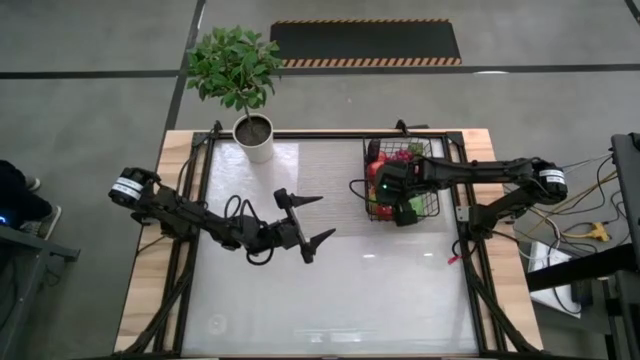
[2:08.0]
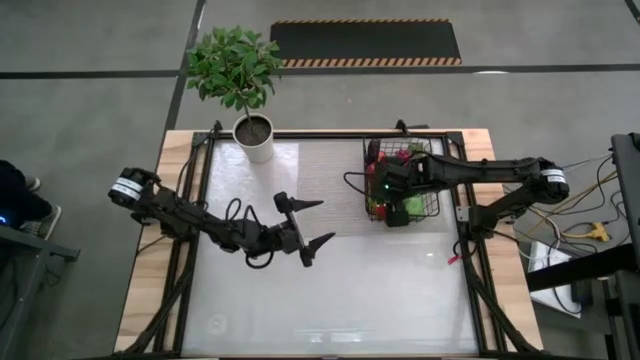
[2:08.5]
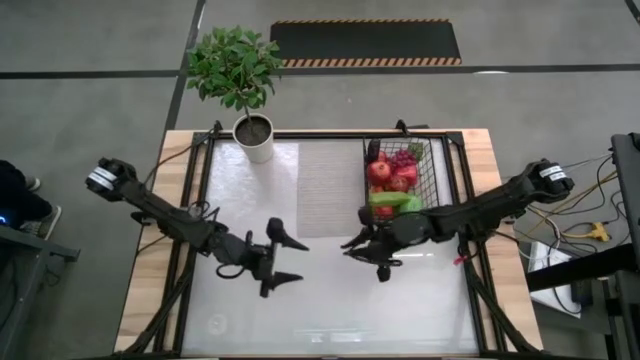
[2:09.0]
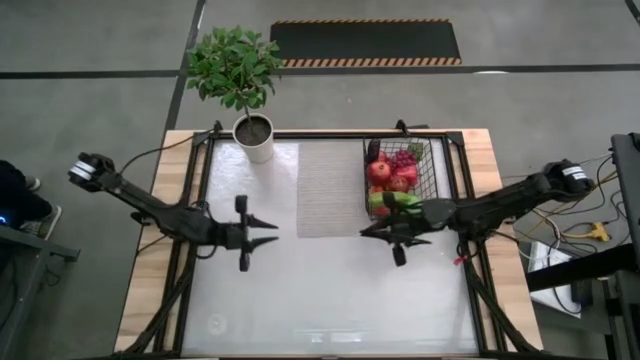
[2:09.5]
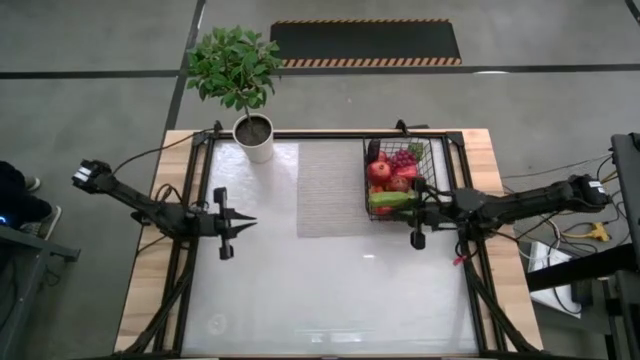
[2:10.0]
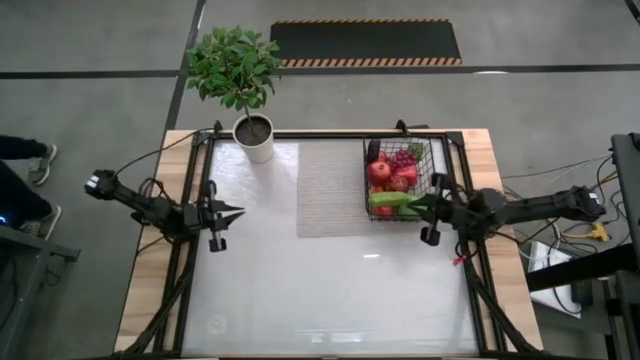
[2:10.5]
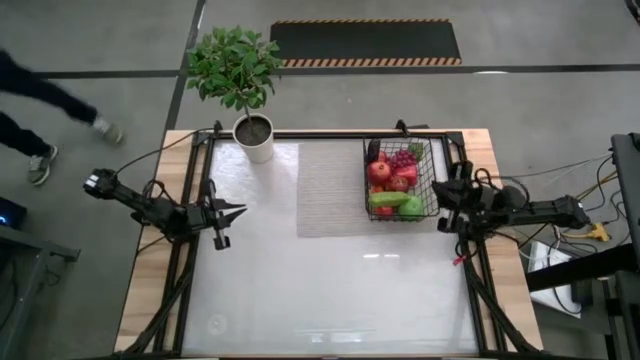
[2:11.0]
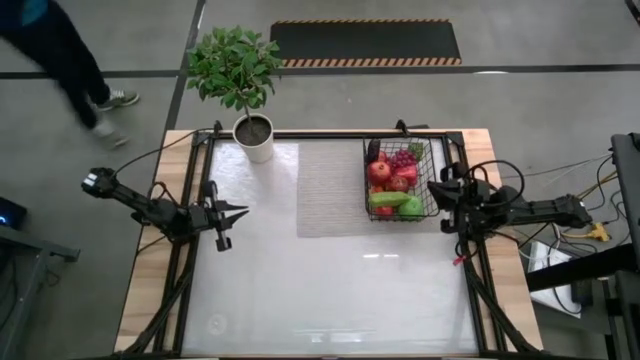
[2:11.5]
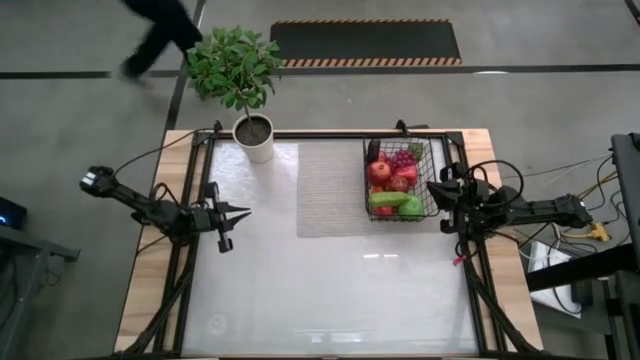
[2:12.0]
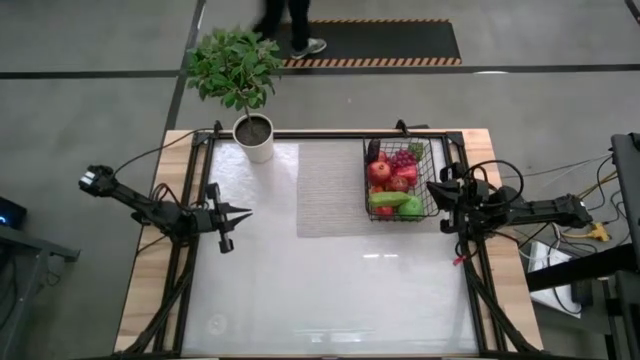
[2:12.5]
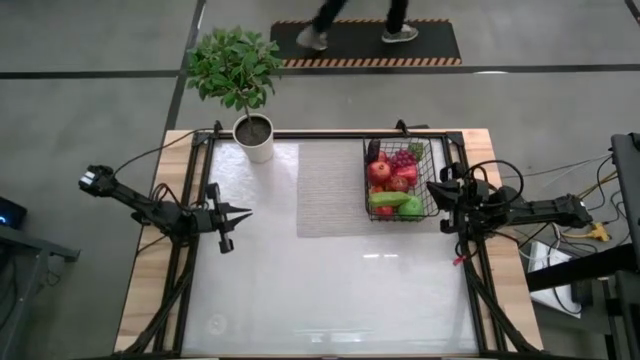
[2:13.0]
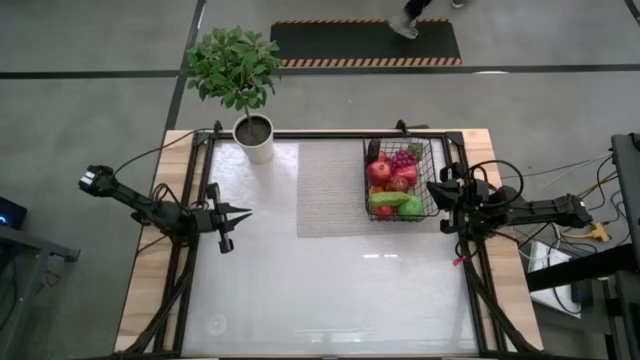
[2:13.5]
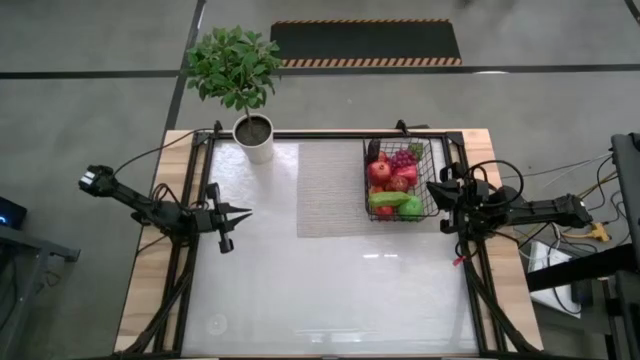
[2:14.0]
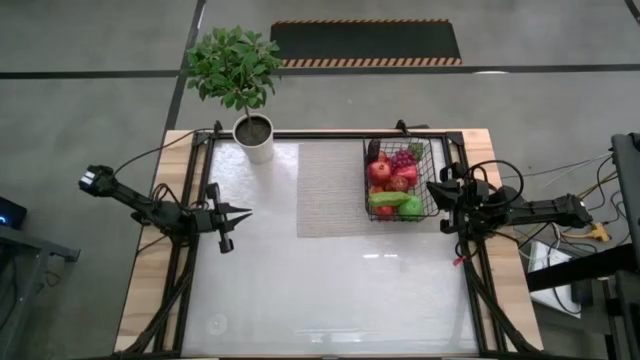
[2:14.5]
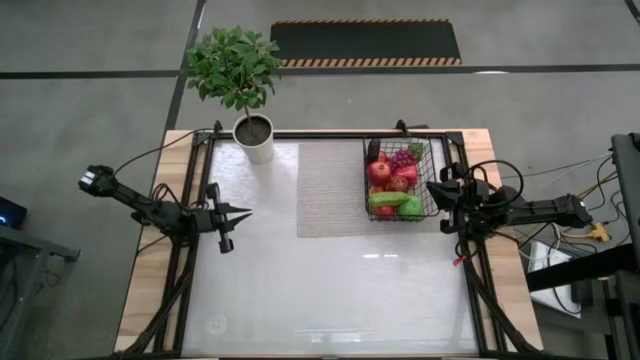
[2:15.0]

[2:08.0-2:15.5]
Task: Build produce basket
Return to Home Position

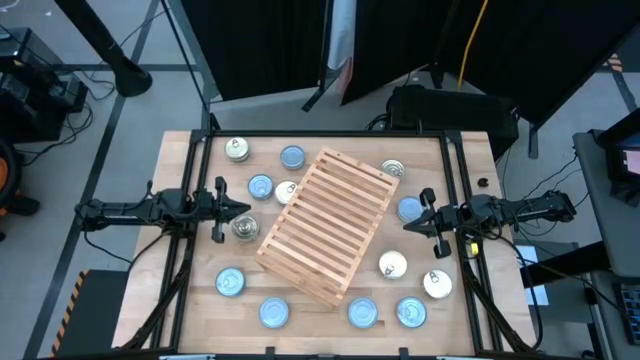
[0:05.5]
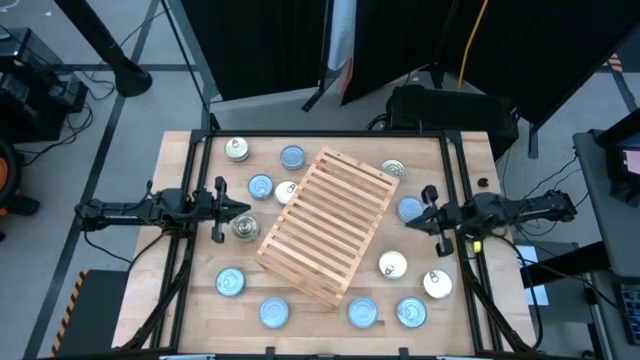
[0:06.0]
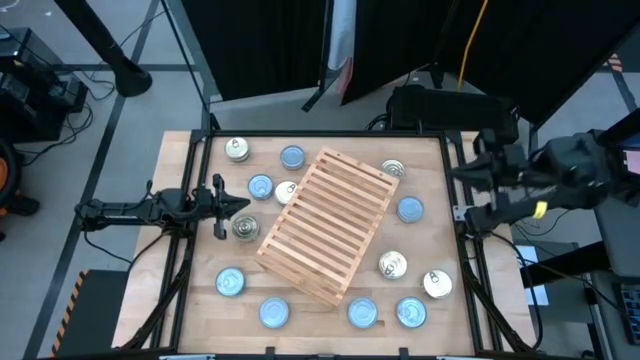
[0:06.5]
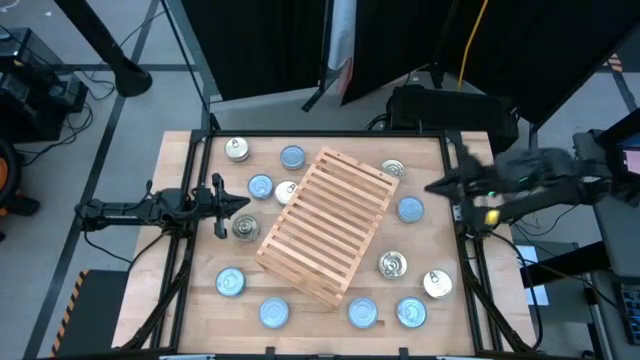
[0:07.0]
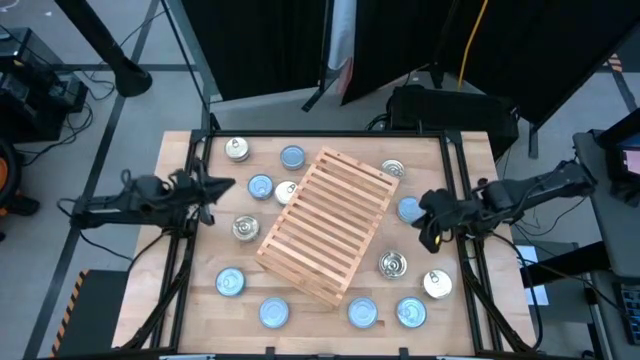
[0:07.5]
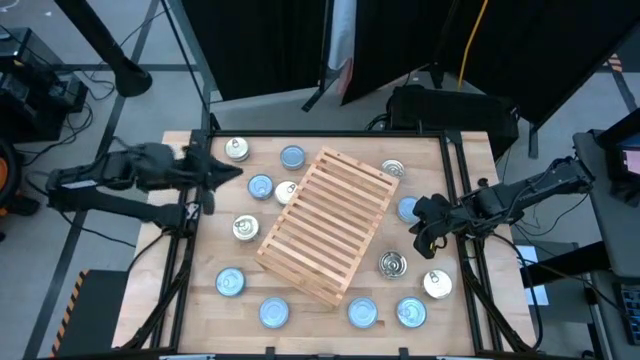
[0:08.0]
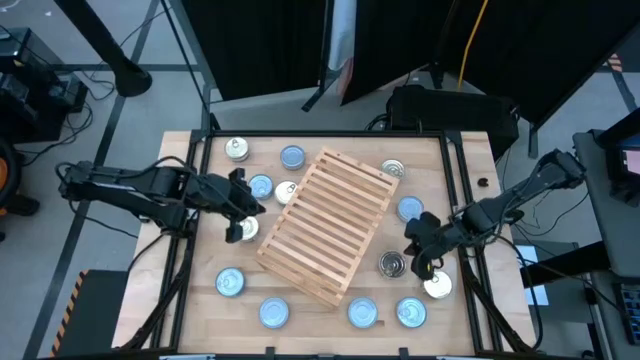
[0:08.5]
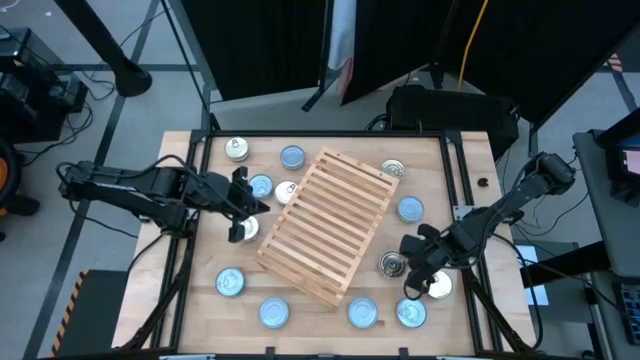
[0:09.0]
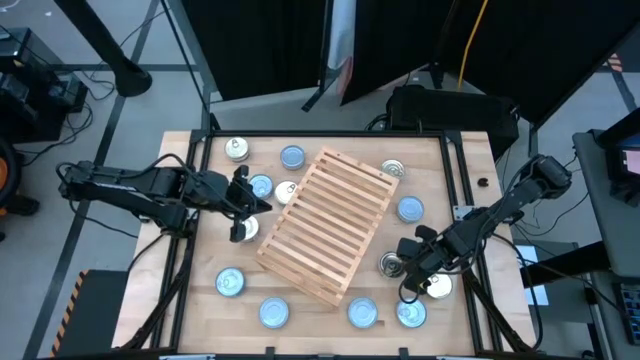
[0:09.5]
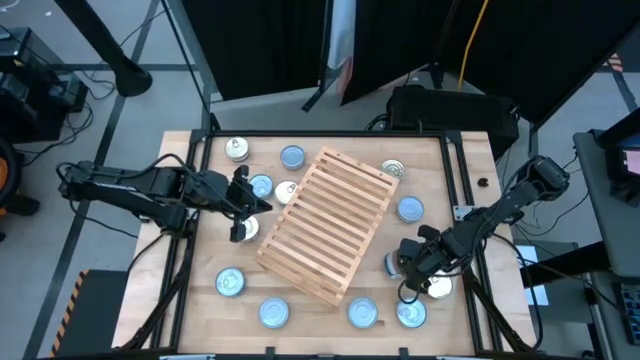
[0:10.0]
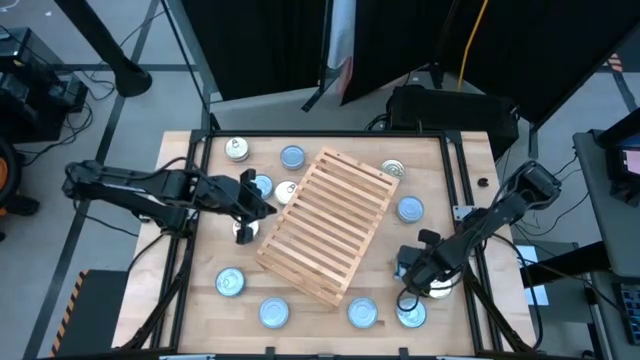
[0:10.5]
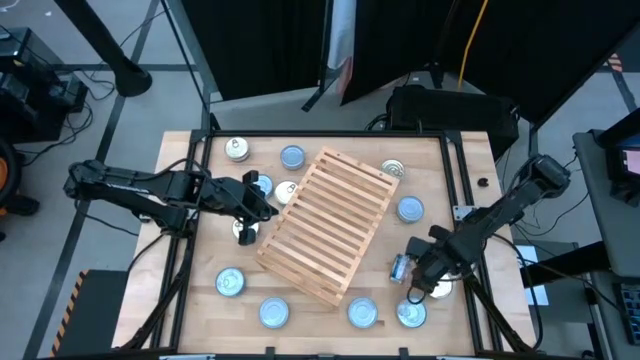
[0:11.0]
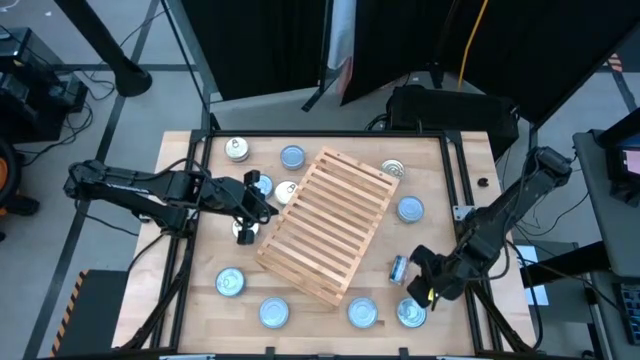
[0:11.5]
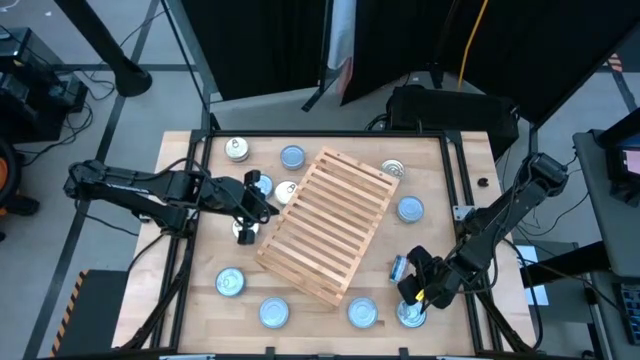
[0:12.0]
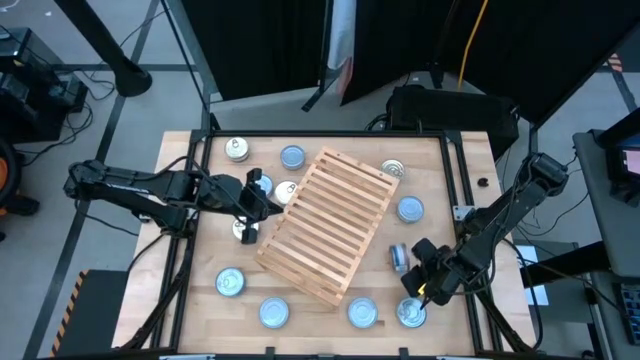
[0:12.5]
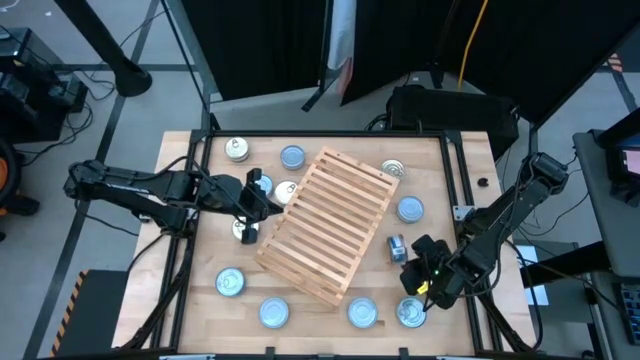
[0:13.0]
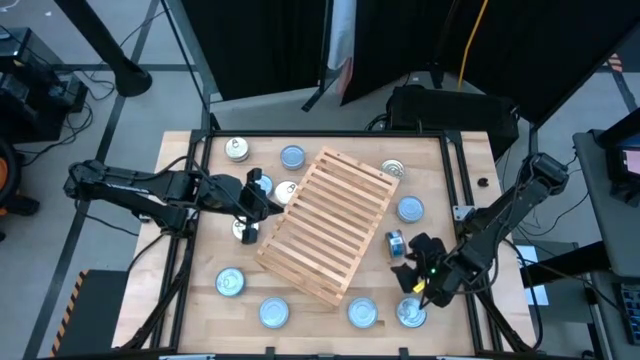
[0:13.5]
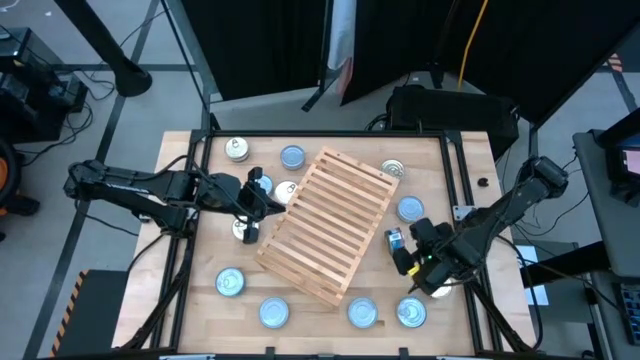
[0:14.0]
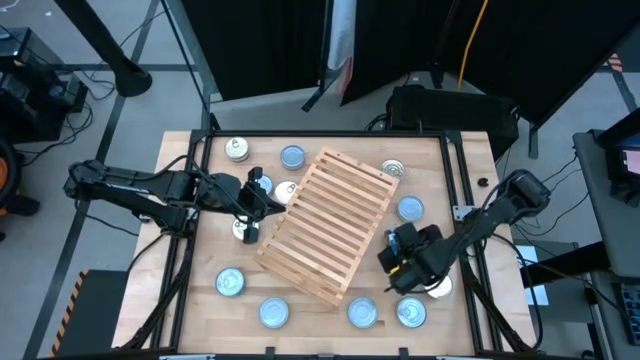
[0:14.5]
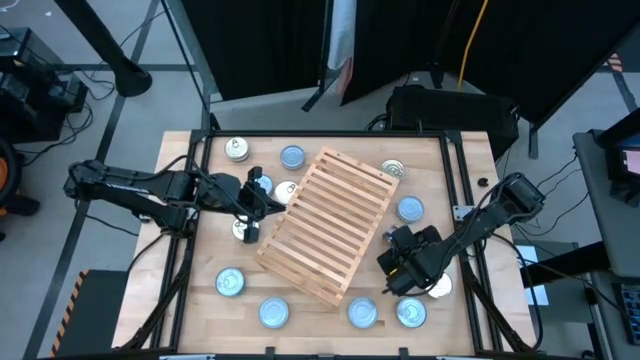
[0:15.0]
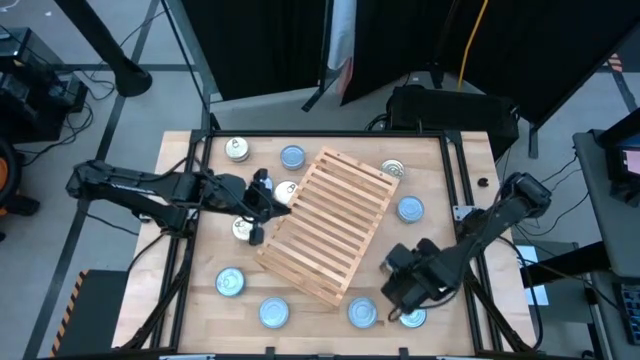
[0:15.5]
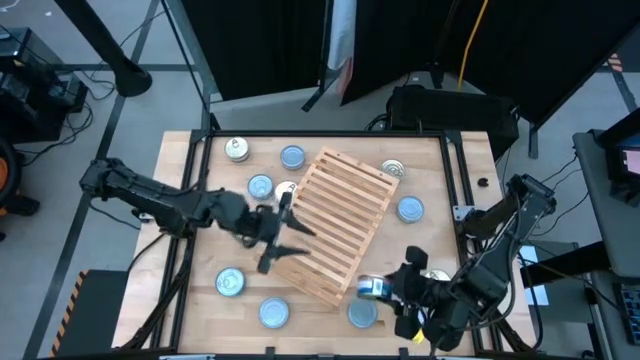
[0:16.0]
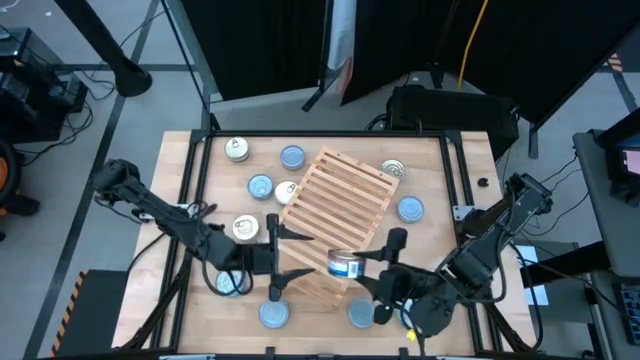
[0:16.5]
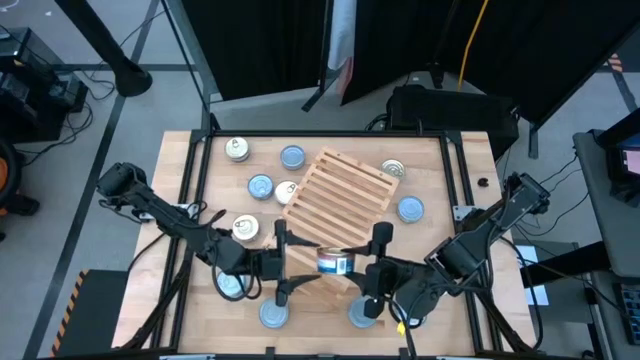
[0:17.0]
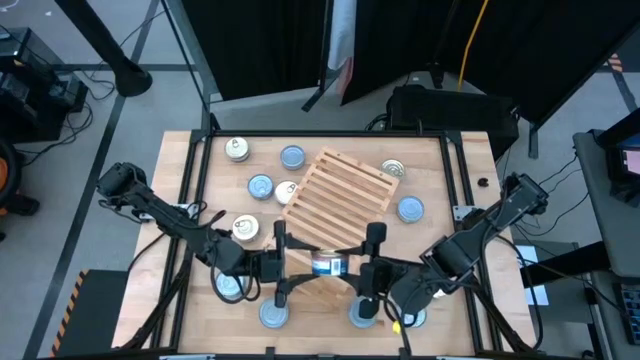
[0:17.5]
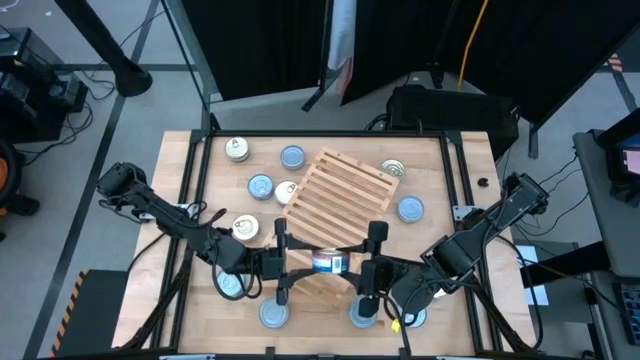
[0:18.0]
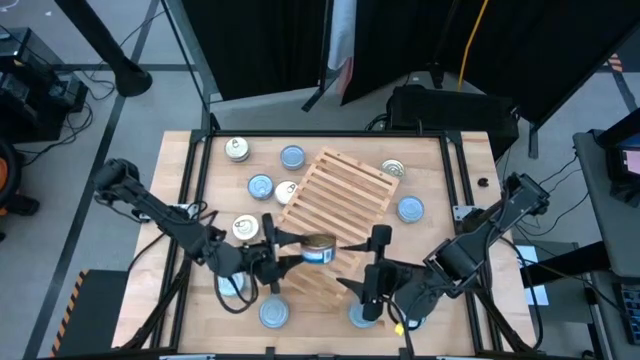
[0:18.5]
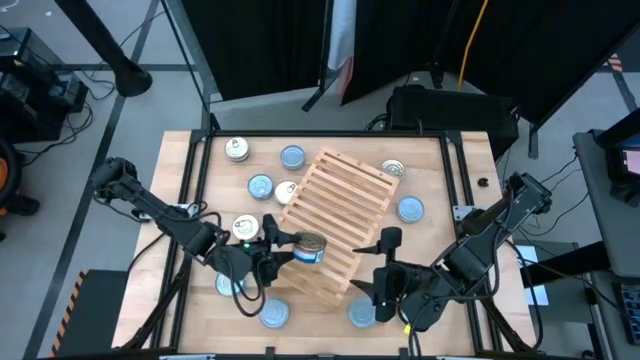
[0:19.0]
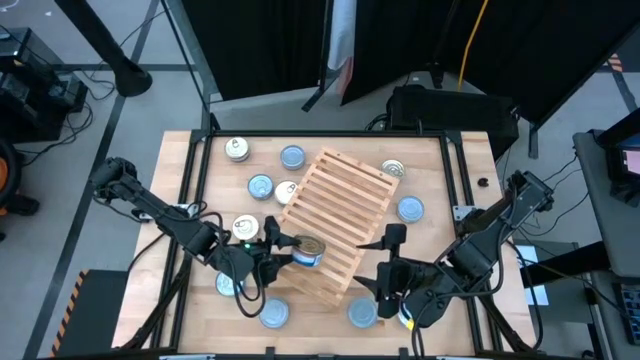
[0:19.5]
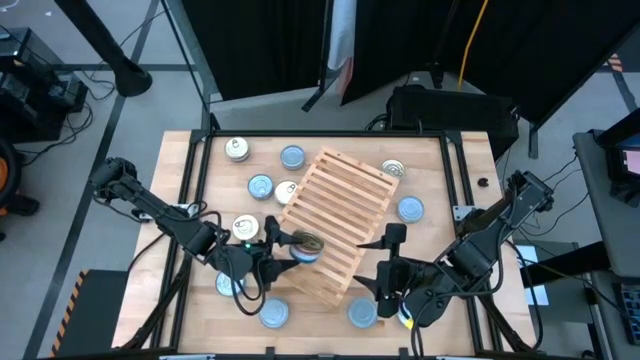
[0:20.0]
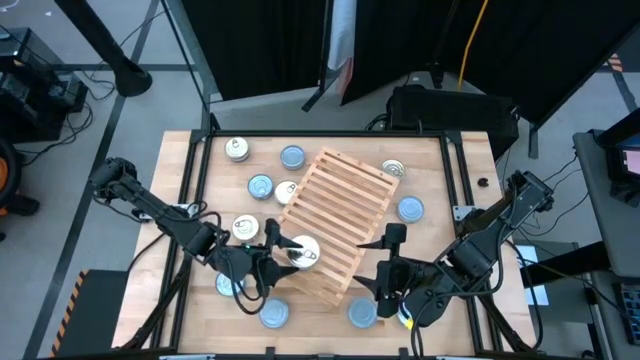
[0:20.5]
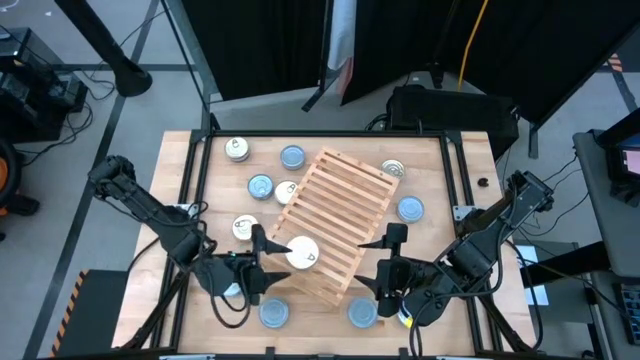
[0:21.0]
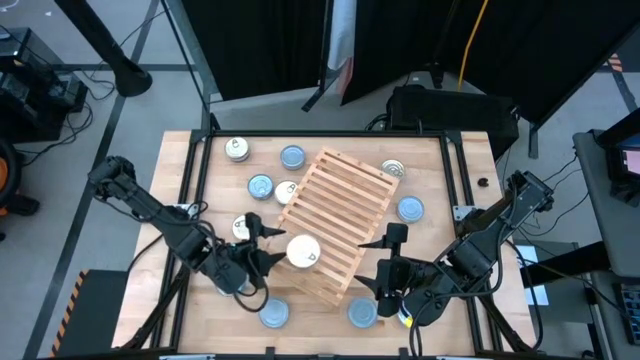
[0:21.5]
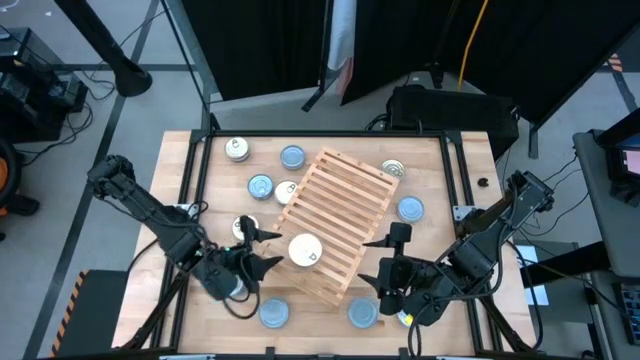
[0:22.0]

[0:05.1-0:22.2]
Task: Stack canned seafood by type on shelf
Put the blue-pink tuna can on the shelf
